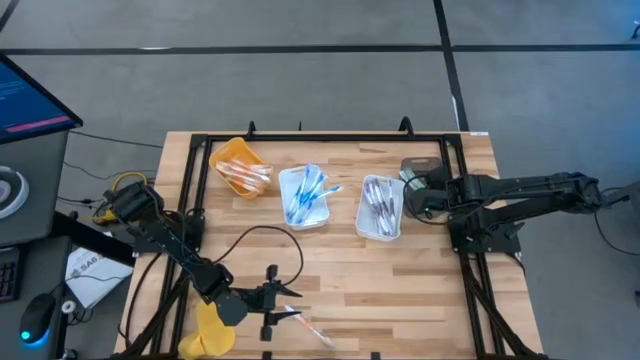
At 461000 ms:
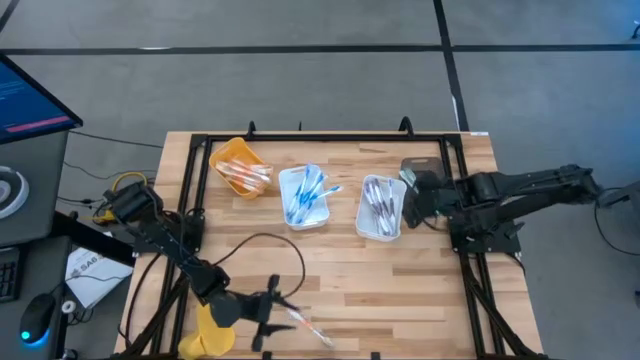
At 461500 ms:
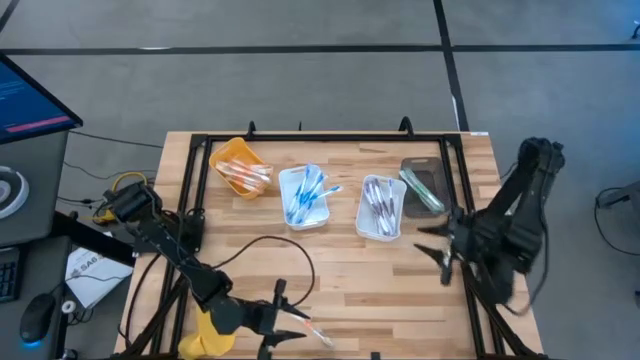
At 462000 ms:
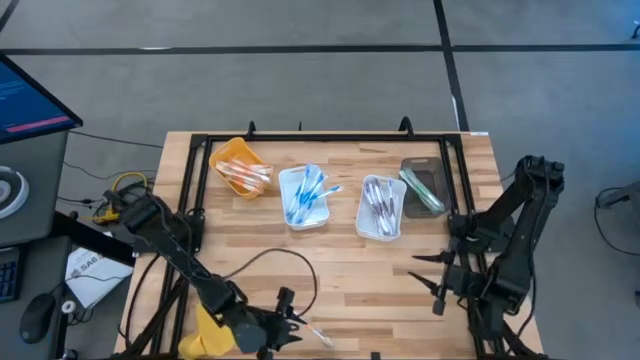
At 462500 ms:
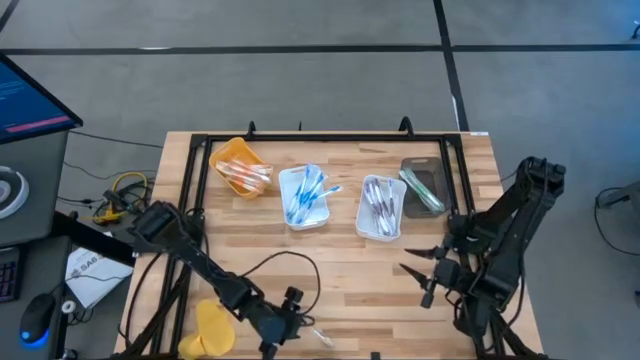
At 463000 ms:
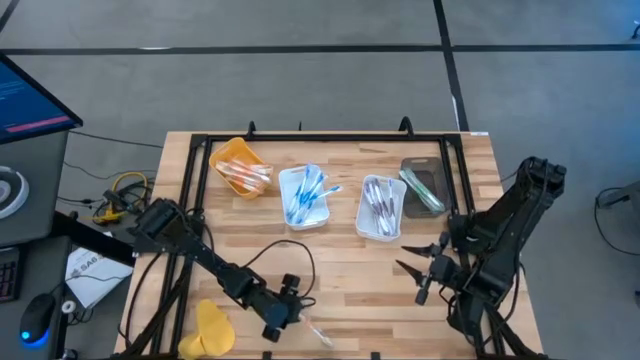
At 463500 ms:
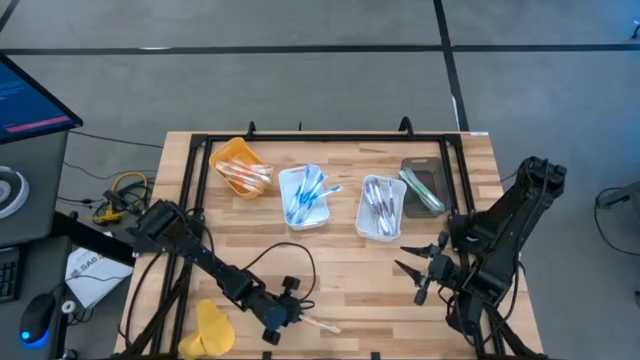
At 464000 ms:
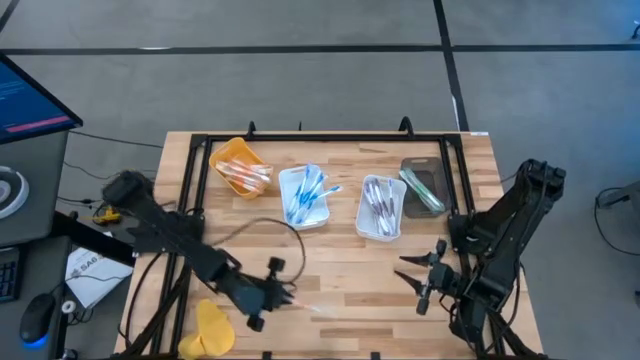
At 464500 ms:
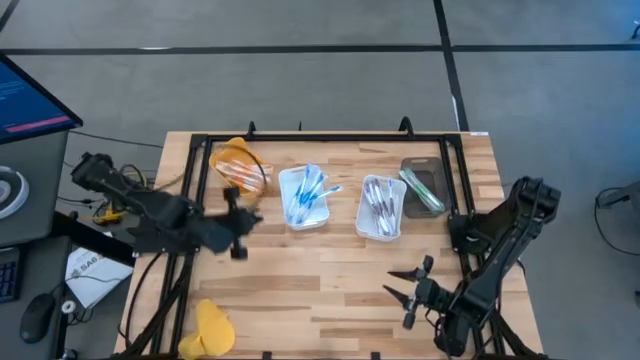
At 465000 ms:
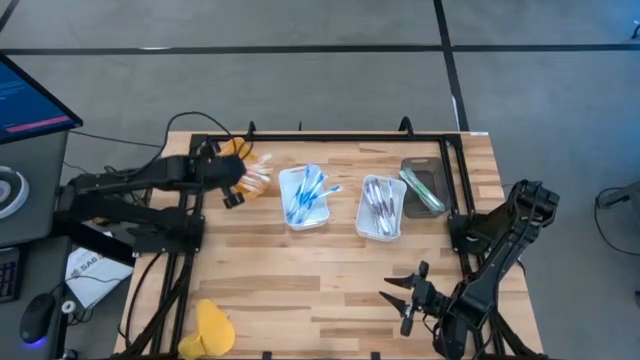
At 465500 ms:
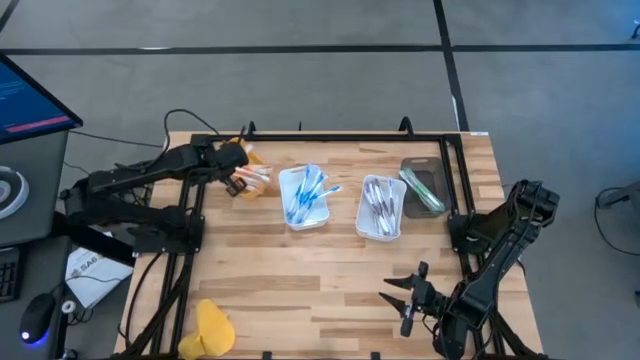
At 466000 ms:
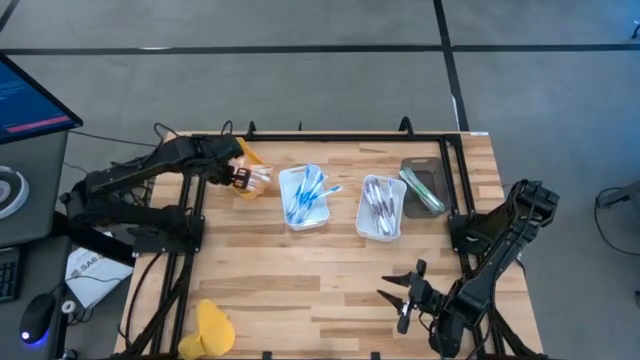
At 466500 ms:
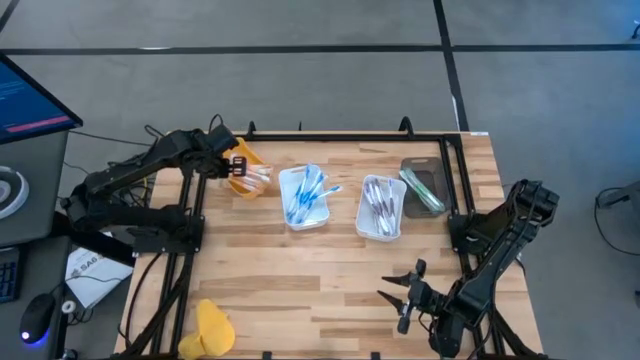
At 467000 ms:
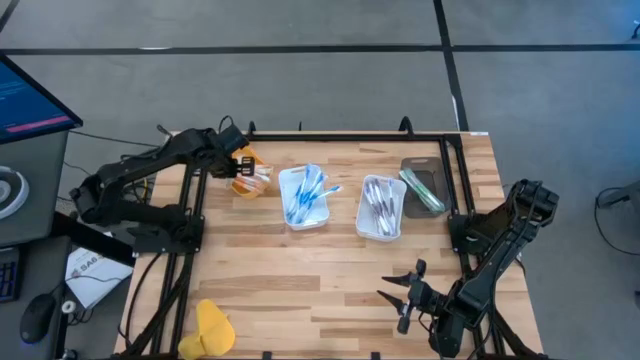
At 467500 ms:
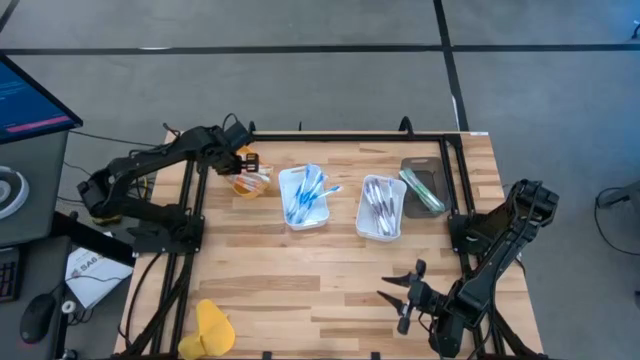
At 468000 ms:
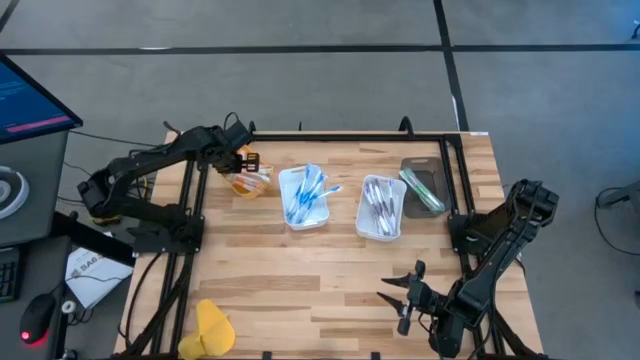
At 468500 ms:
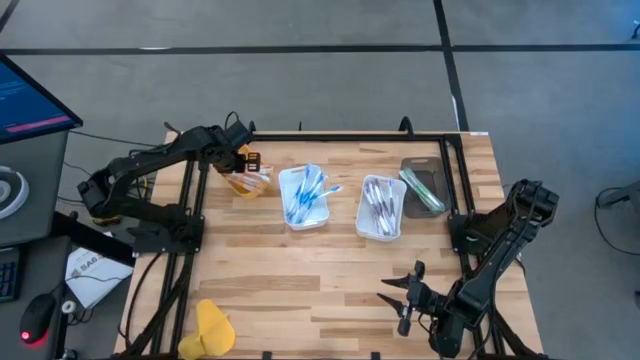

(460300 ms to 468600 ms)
Task: Pick & Place Toothbrushes
Put the orange toothbrush into the orange bin

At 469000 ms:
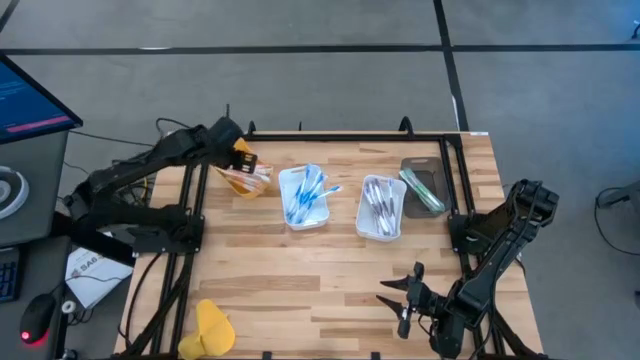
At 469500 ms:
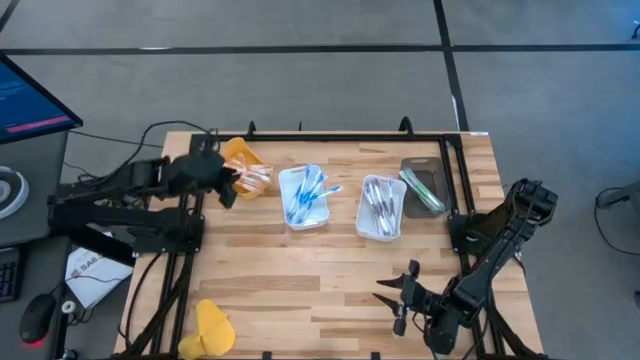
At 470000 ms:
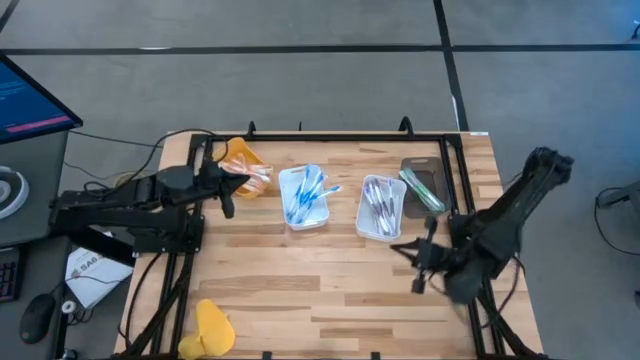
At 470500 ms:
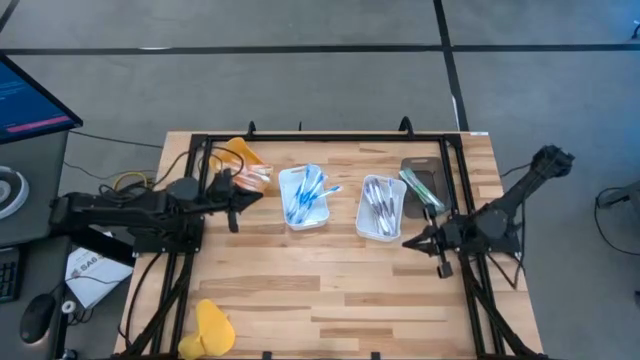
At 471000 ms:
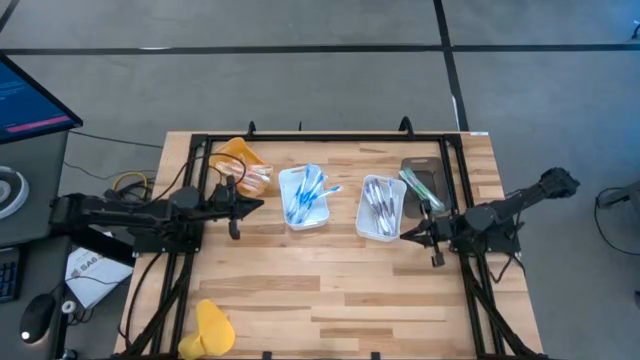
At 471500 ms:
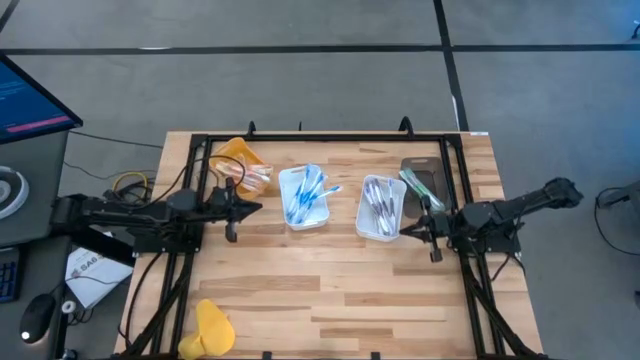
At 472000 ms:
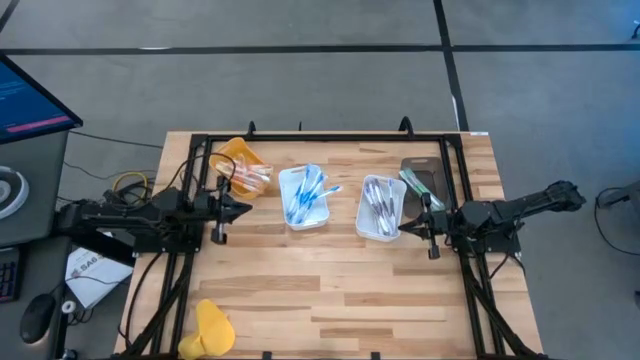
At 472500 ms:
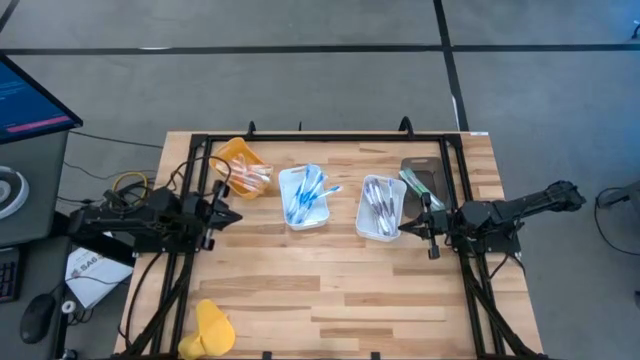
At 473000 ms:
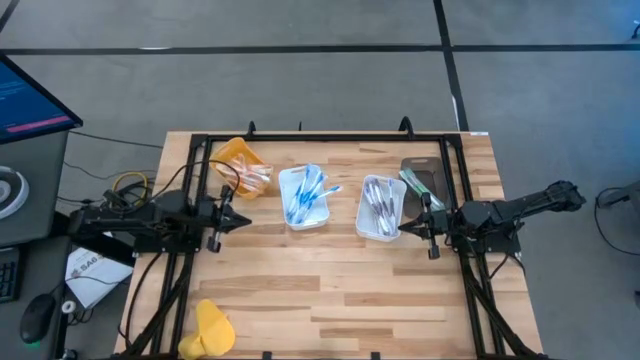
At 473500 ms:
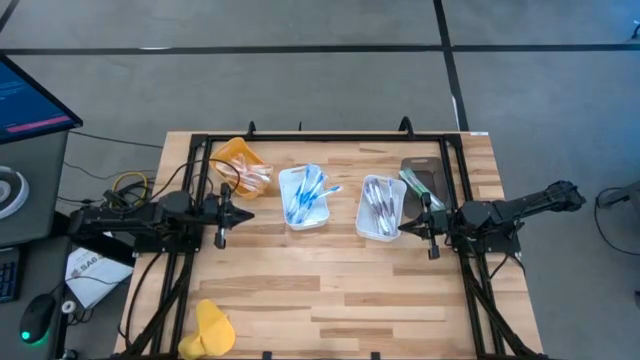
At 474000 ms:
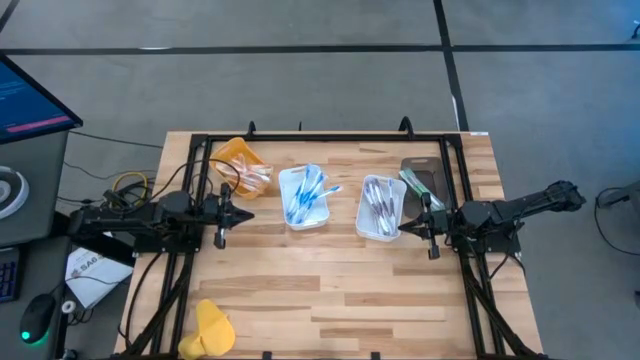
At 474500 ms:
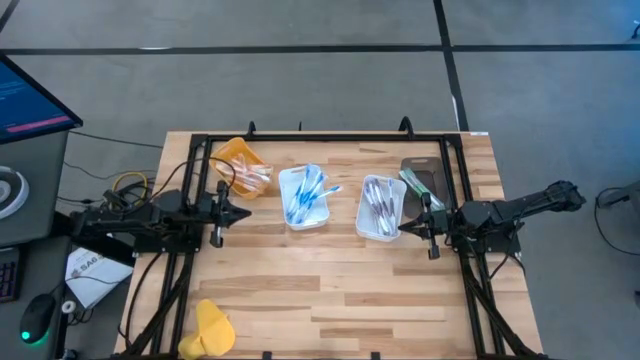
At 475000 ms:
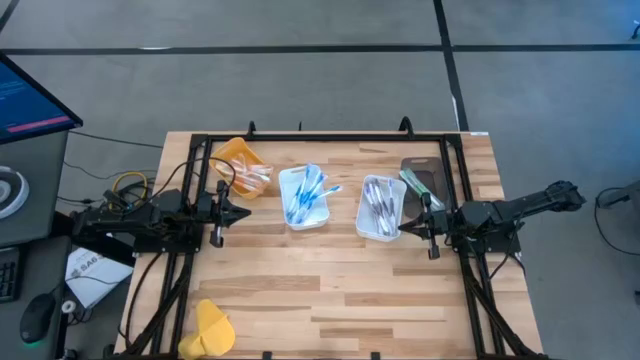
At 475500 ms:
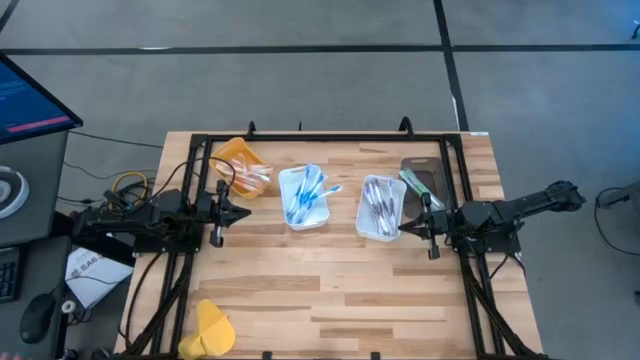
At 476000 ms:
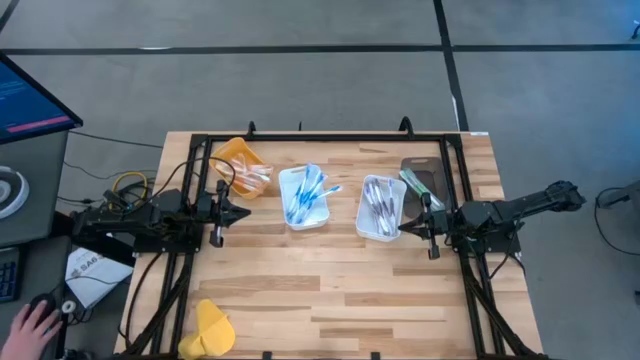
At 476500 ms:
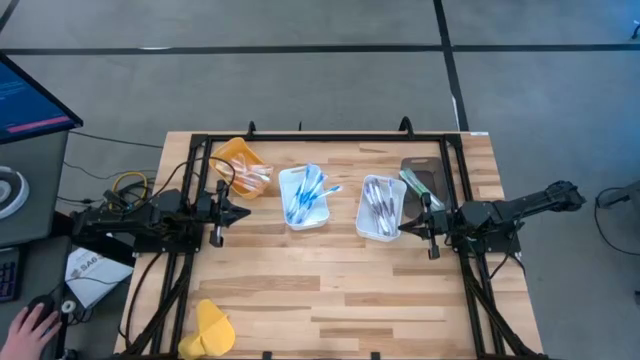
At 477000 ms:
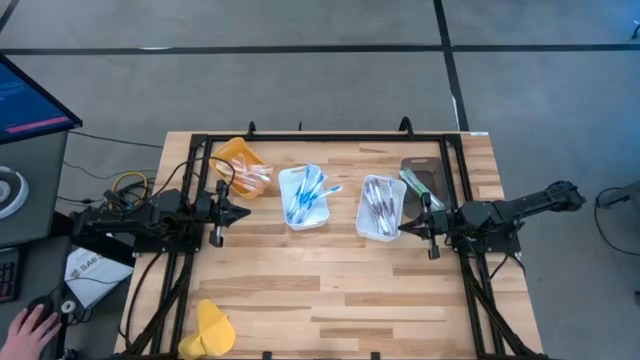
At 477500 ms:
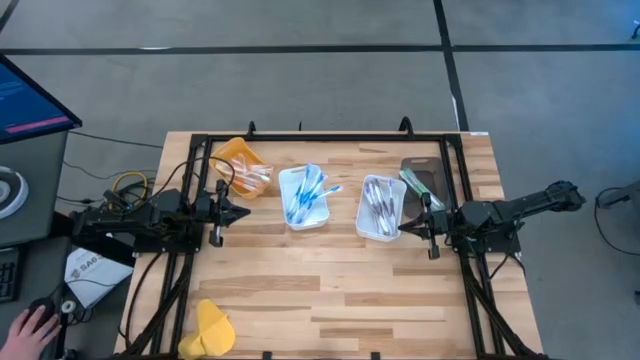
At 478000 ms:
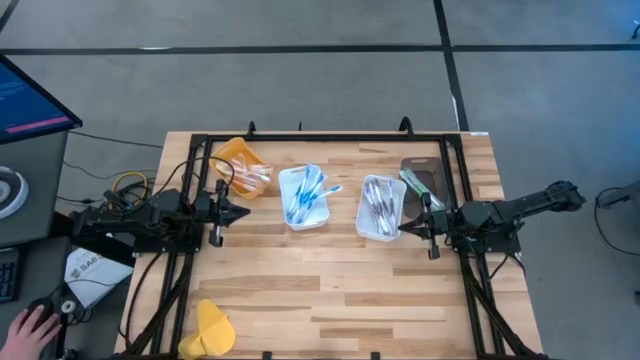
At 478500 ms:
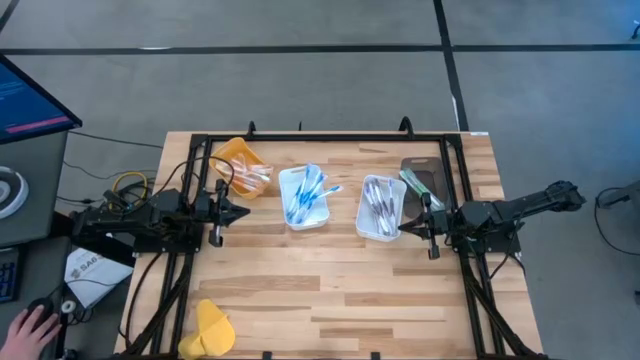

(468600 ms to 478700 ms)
Return to Home Position

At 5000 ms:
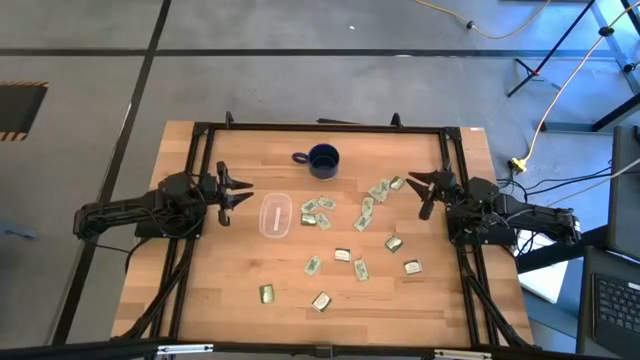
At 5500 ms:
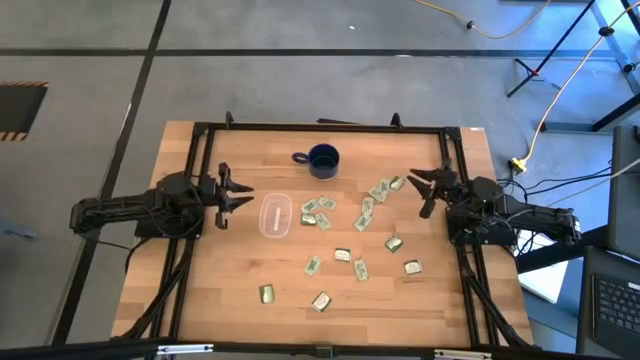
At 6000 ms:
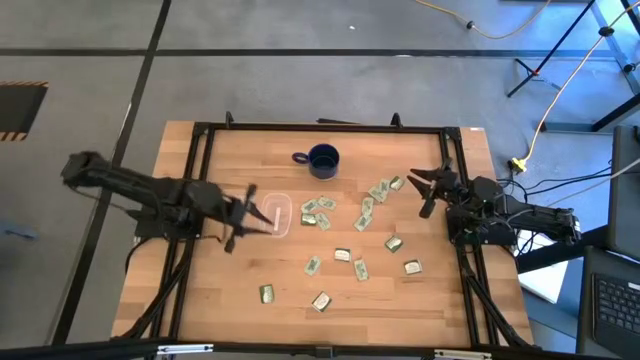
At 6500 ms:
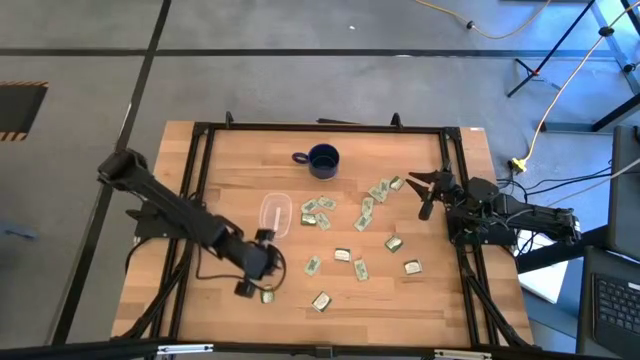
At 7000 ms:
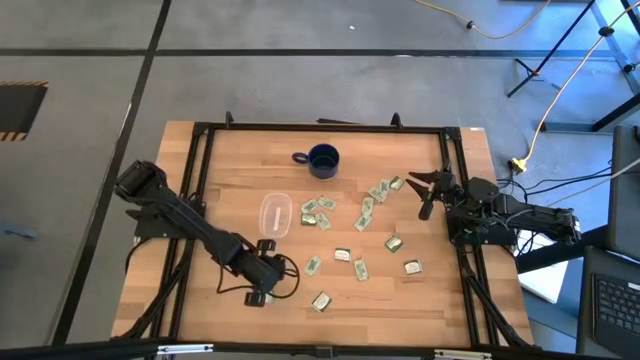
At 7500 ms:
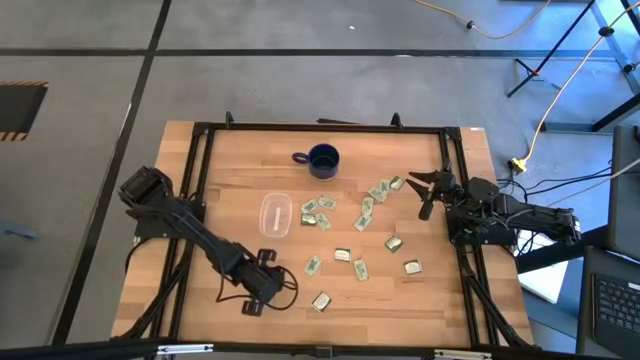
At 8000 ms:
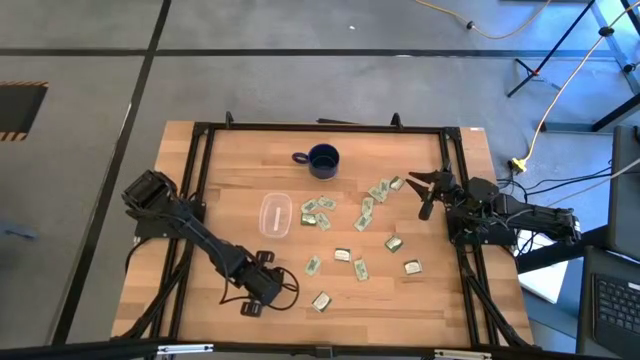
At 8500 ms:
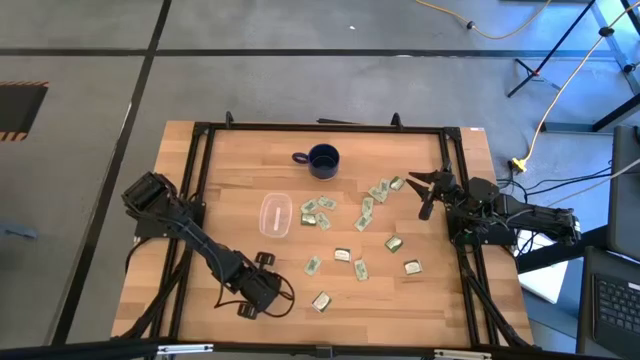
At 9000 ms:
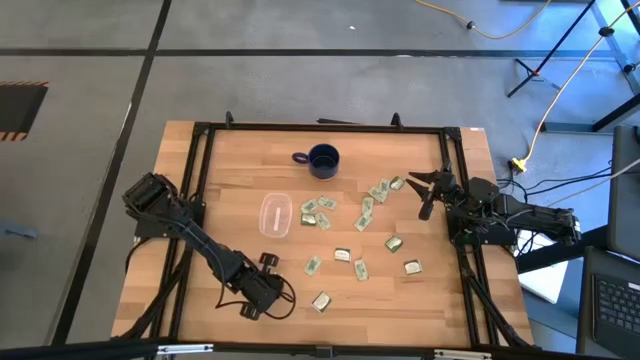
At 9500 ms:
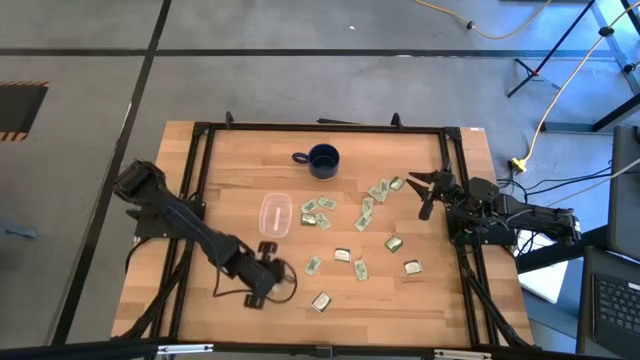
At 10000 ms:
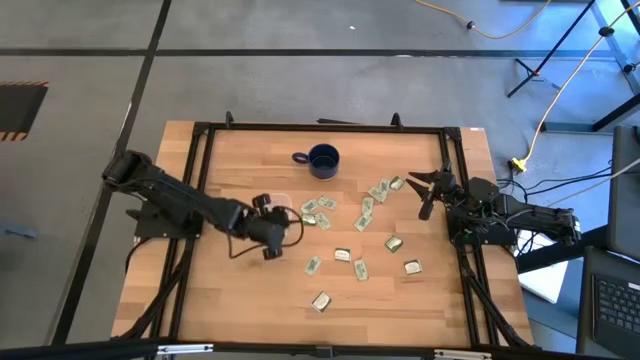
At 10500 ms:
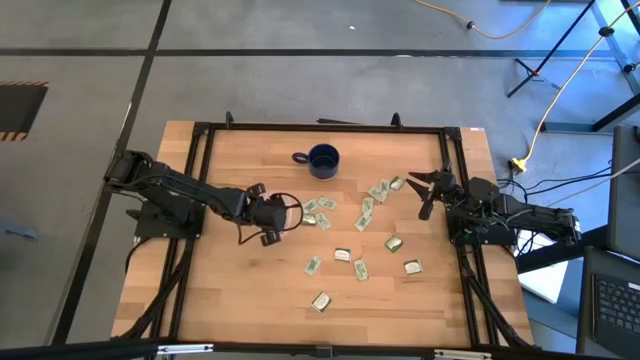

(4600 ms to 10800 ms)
Task: Pick and place Stevia / Truvia into bins
Put the green stevia packet into the transparent container
